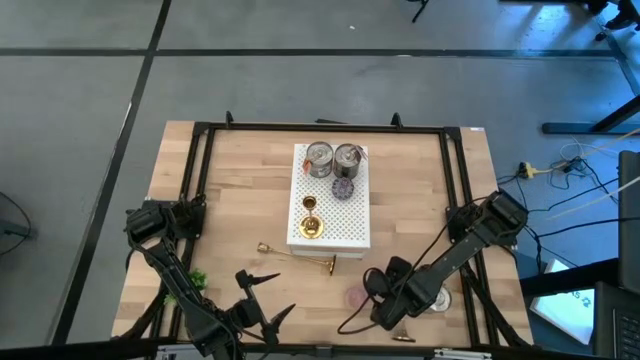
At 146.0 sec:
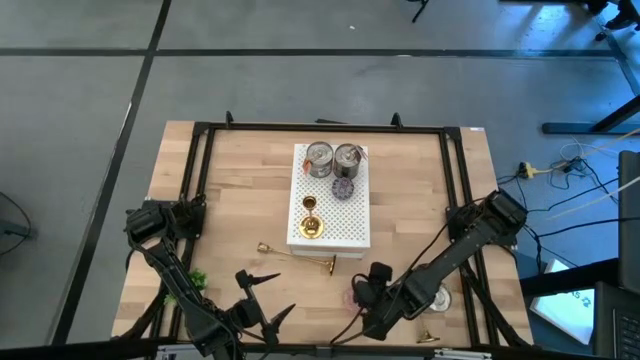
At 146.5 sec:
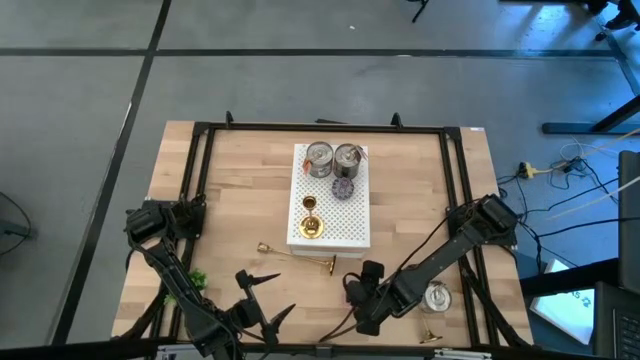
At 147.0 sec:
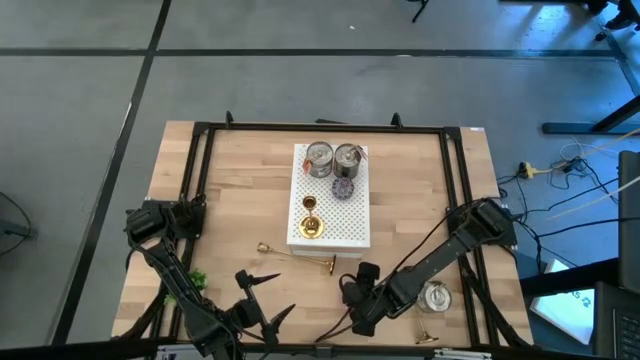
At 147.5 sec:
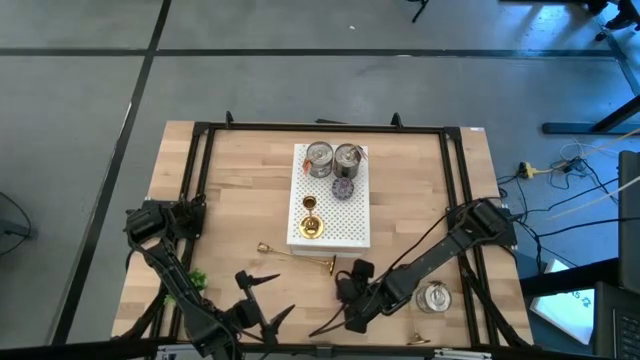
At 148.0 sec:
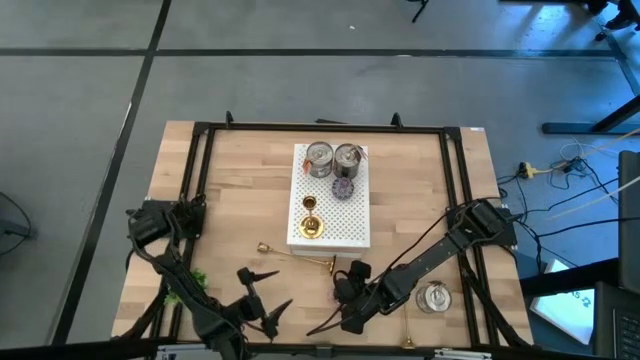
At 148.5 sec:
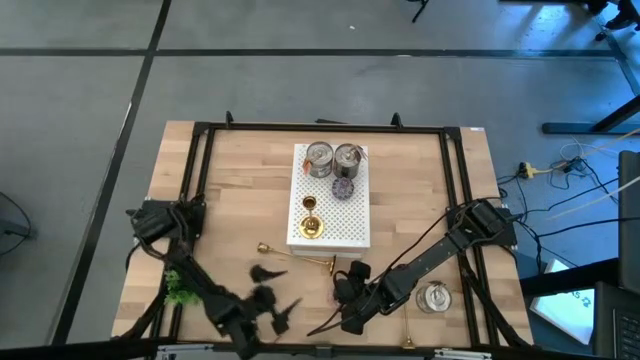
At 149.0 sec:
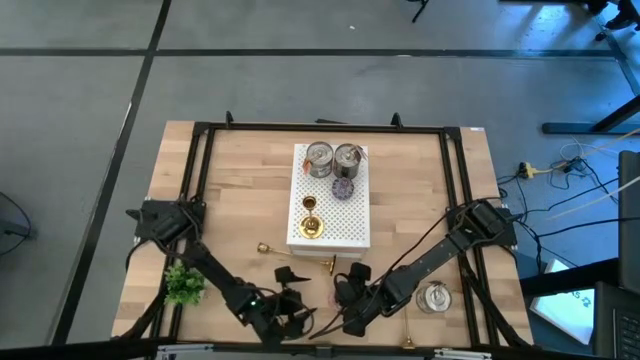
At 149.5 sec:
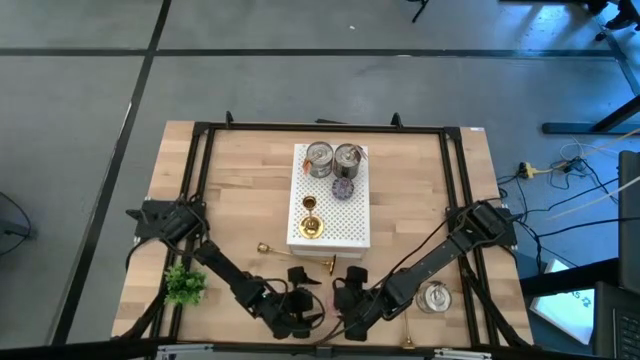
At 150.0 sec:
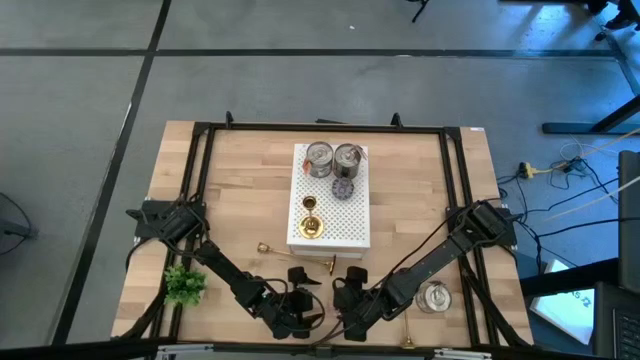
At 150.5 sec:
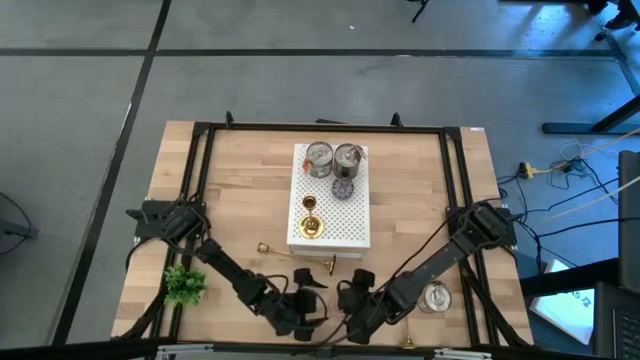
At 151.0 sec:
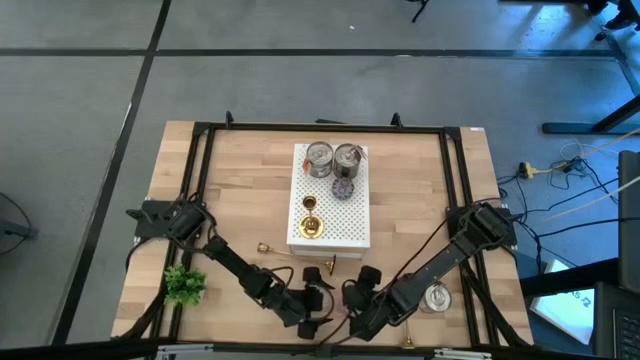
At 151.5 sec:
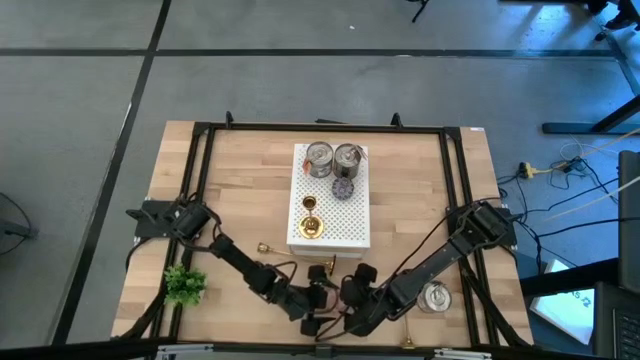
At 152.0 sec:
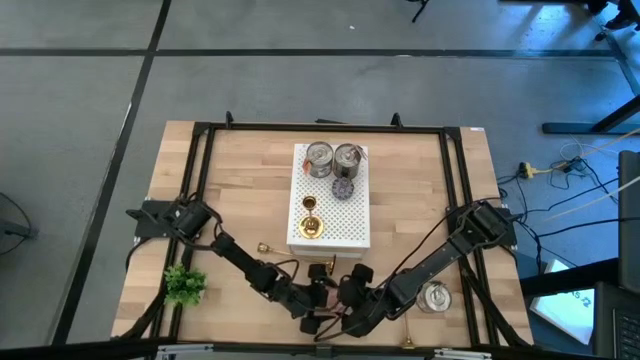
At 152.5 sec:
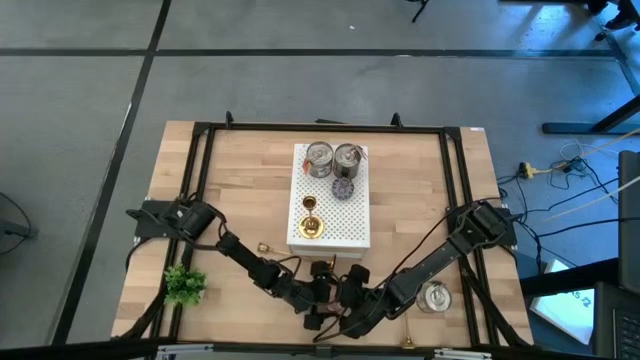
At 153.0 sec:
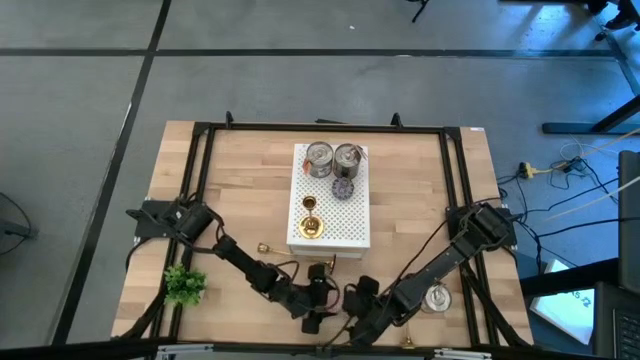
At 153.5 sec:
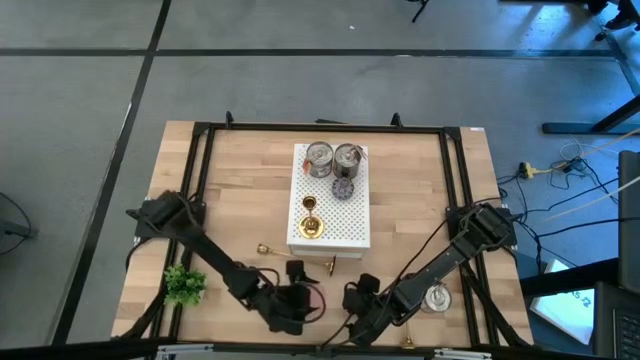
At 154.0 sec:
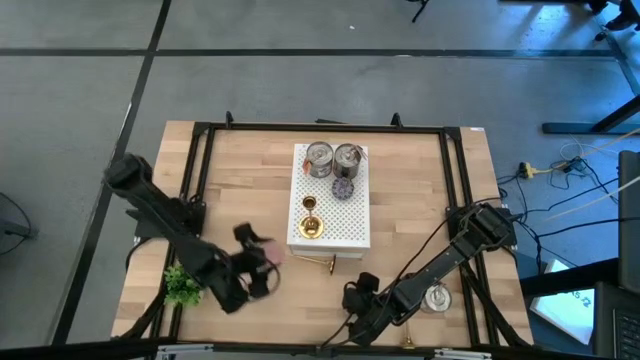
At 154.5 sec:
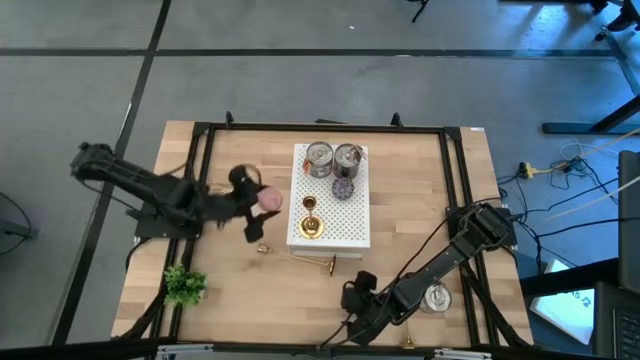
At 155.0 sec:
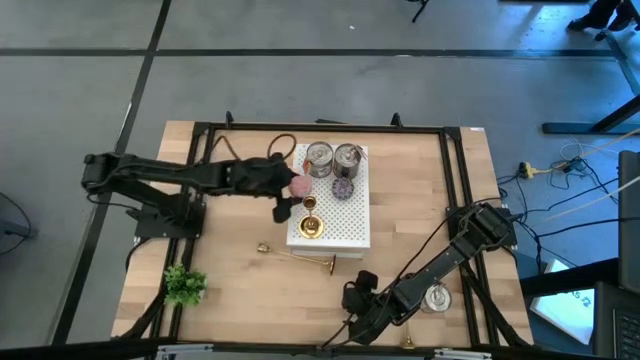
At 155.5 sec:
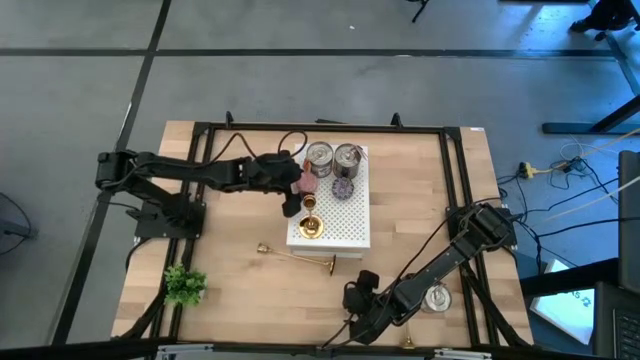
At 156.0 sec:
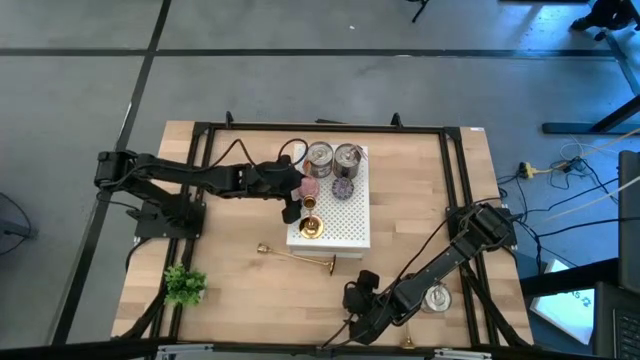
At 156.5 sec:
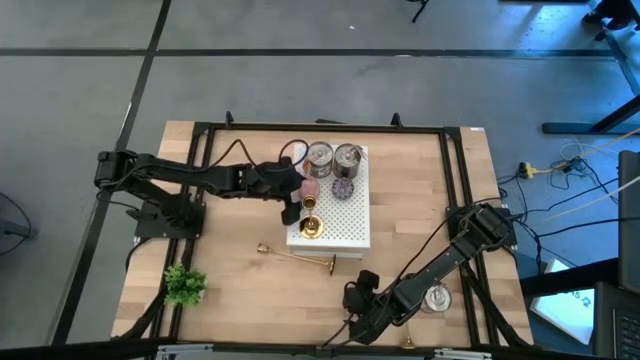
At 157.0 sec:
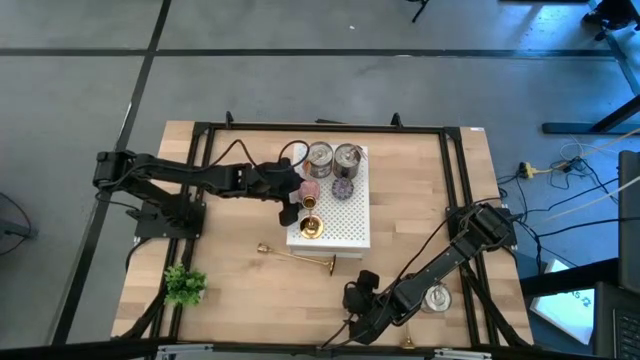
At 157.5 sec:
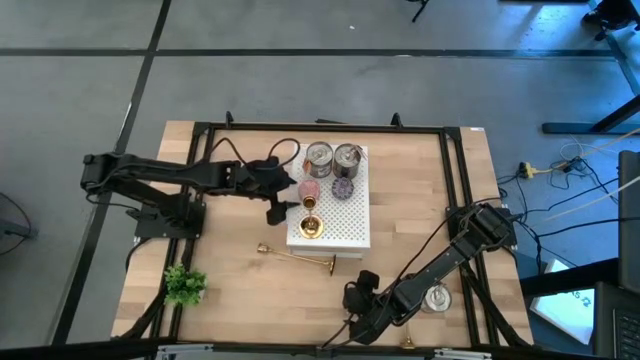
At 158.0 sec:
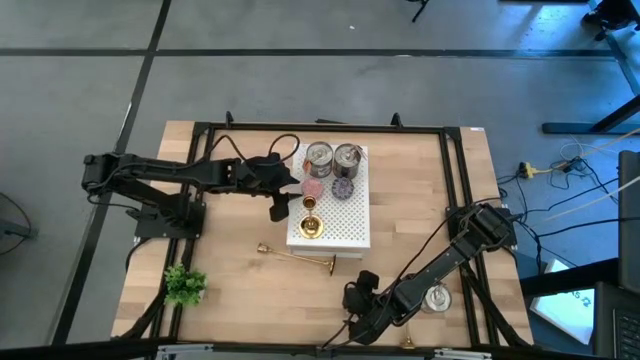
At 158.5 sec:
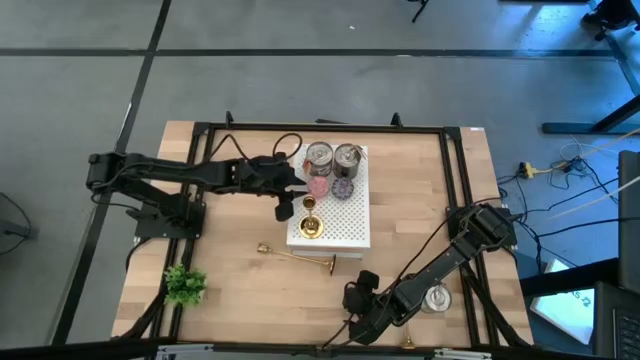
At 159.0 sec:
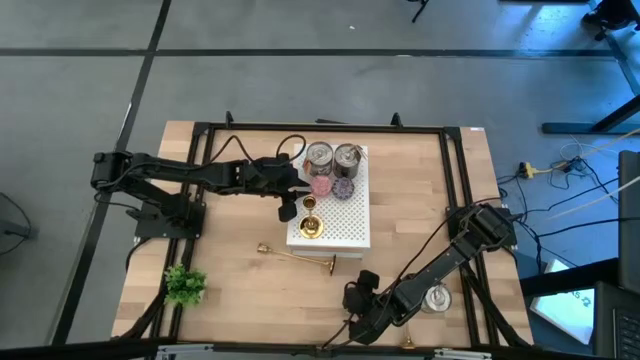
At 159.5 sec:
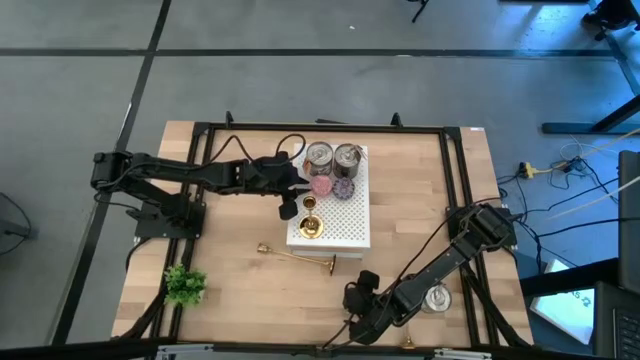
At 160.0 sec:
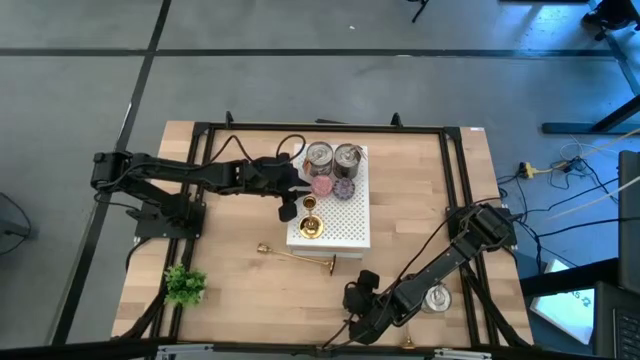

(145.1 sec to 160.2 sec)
Task: Pick & Place candle stick holders
Put the pink scented candle on the shelf

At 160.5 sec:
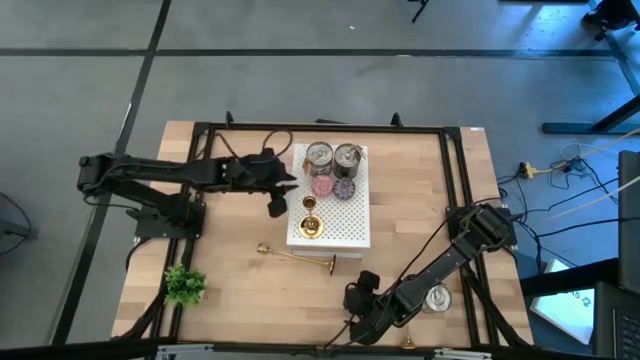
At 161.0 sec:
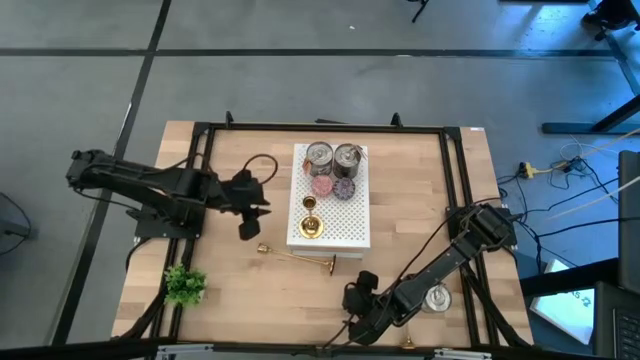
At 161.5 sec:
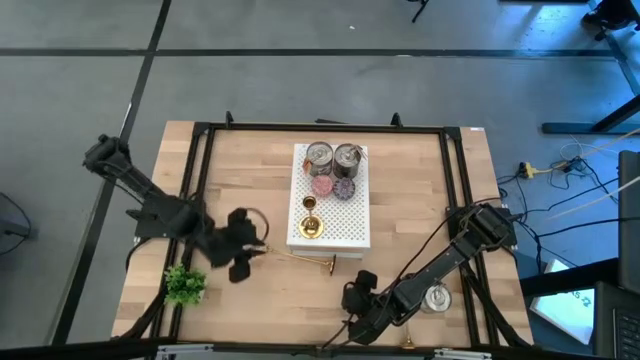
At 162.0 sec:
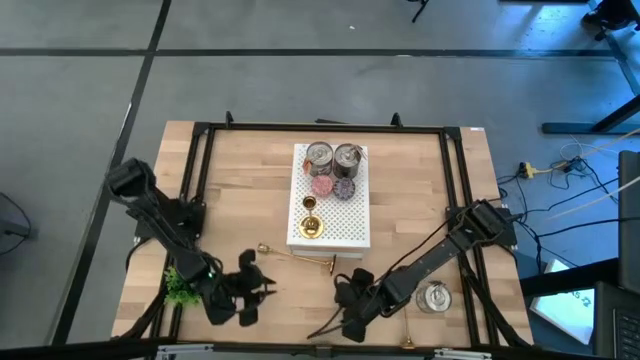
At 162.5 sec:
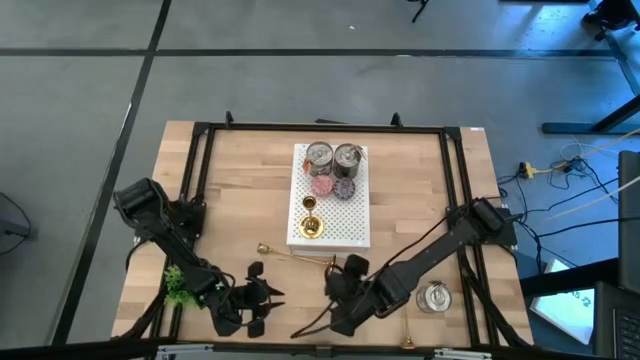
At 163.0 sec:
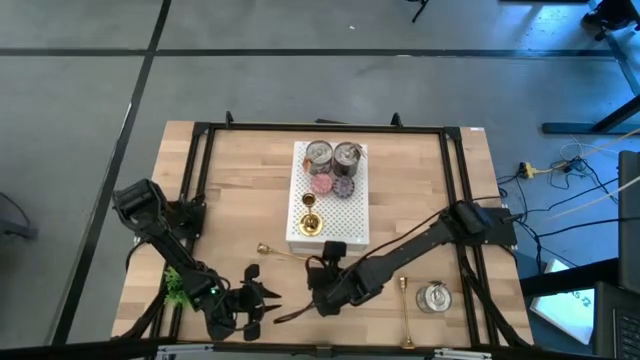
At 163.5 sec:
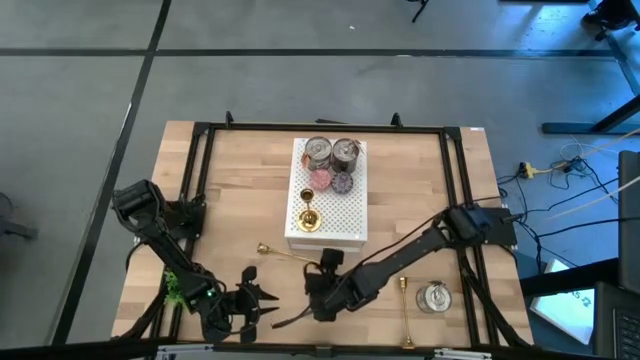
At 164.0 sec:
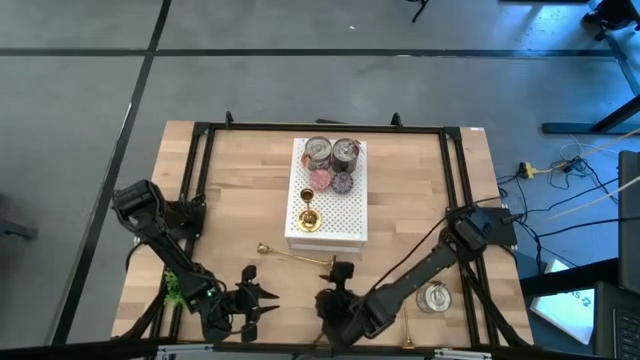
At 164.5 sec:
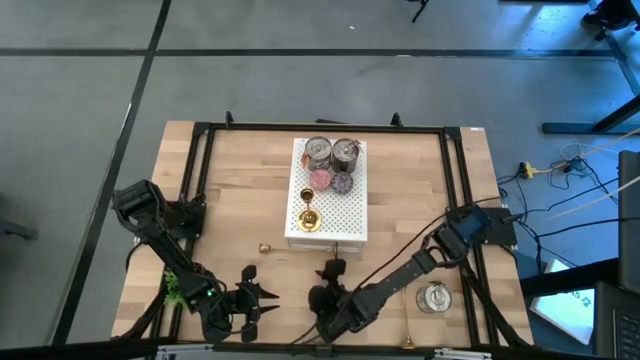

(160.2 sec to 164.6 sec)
Put the top gold candle holder on the shelf
